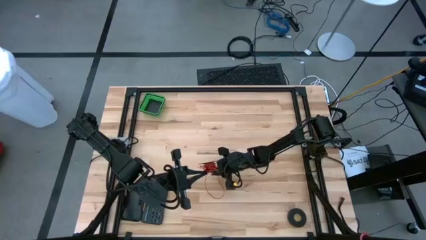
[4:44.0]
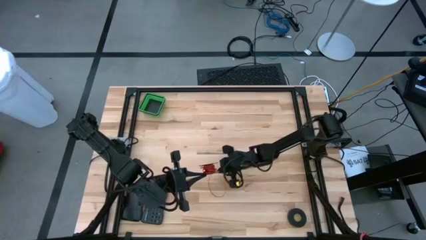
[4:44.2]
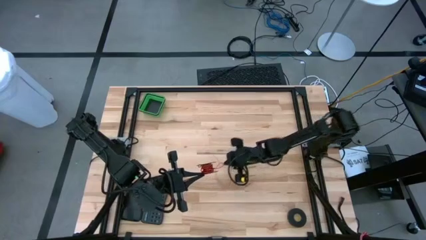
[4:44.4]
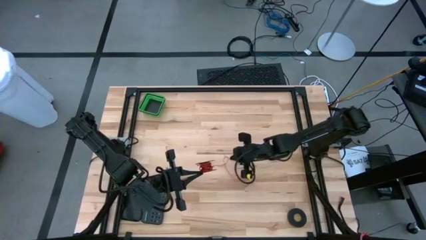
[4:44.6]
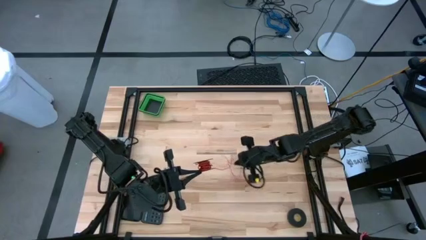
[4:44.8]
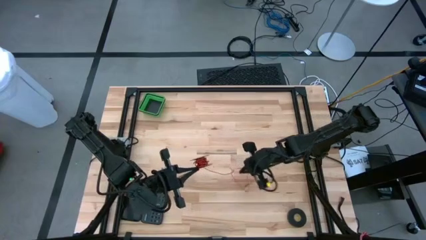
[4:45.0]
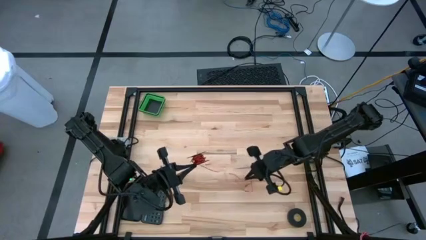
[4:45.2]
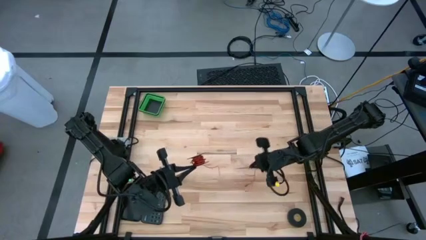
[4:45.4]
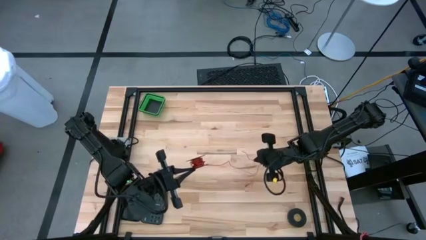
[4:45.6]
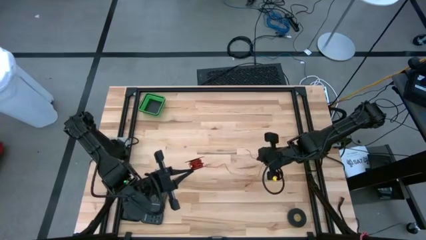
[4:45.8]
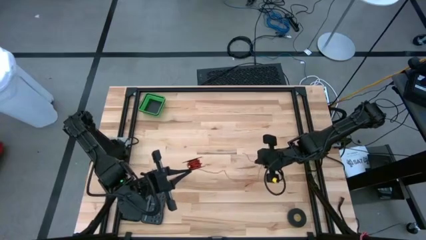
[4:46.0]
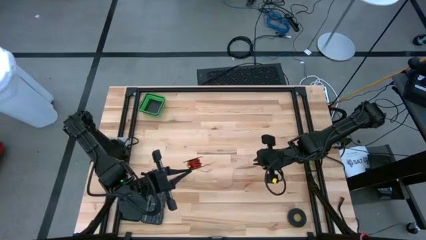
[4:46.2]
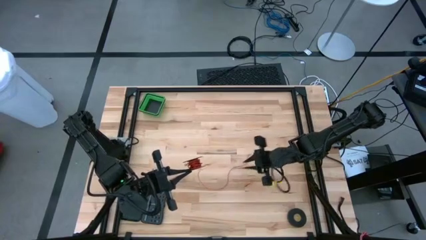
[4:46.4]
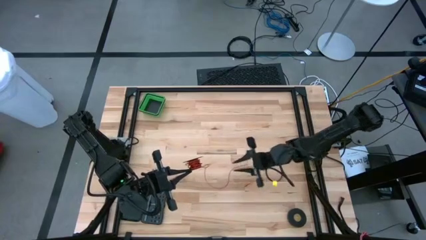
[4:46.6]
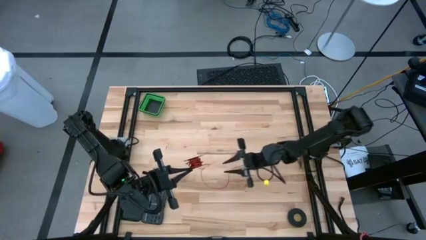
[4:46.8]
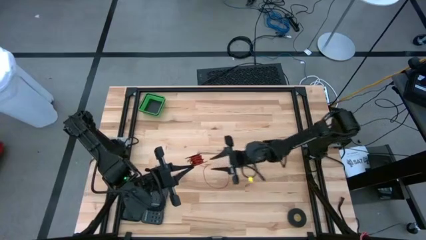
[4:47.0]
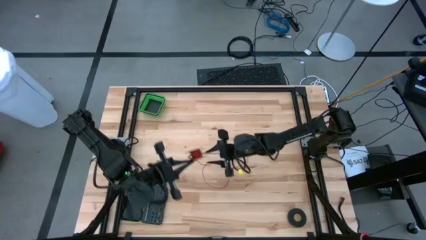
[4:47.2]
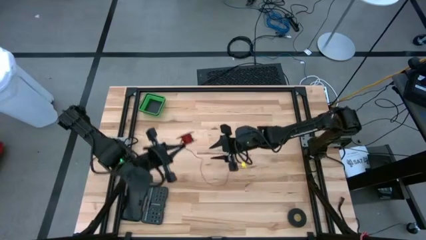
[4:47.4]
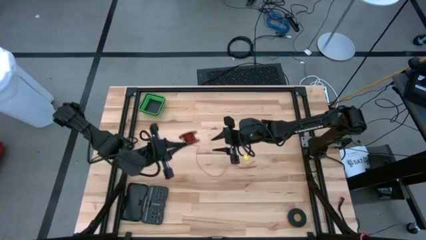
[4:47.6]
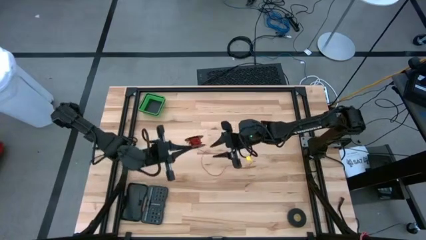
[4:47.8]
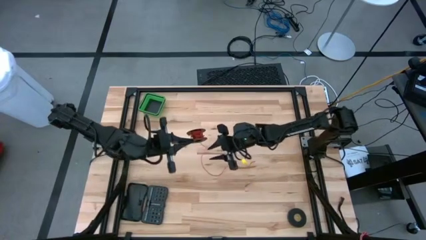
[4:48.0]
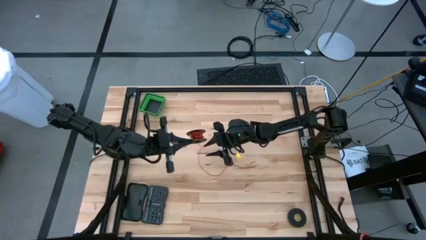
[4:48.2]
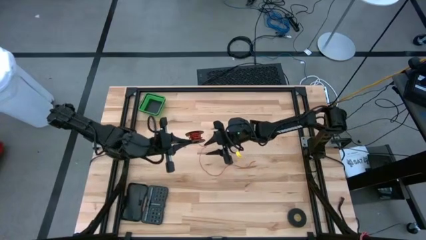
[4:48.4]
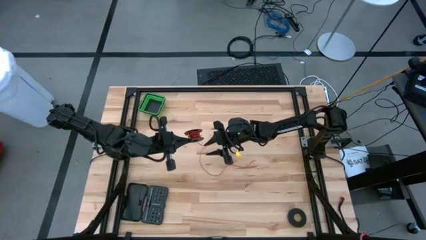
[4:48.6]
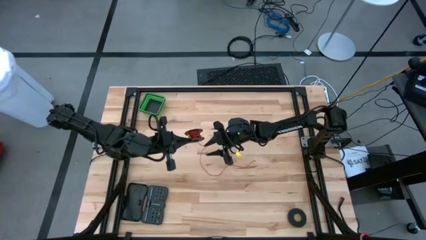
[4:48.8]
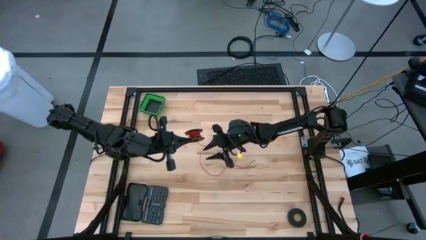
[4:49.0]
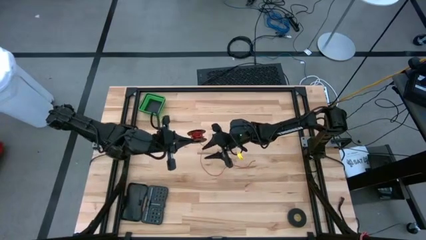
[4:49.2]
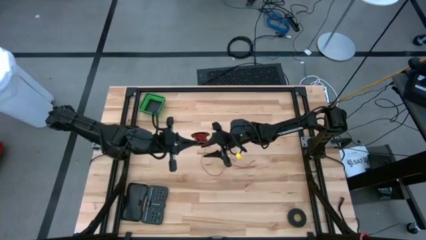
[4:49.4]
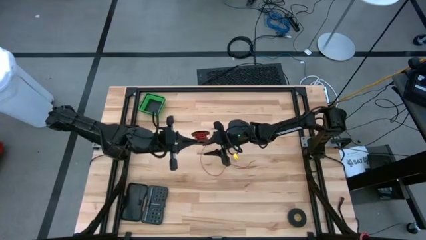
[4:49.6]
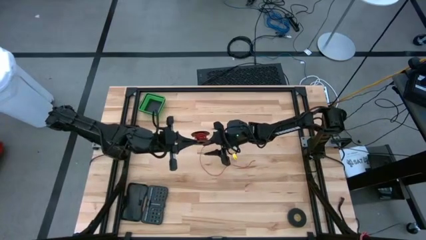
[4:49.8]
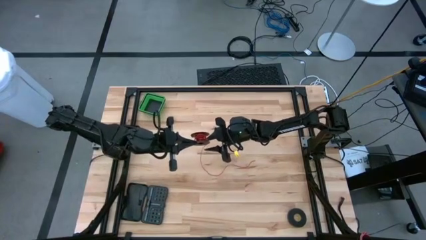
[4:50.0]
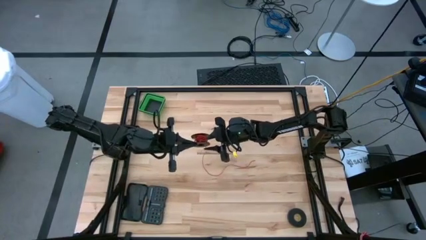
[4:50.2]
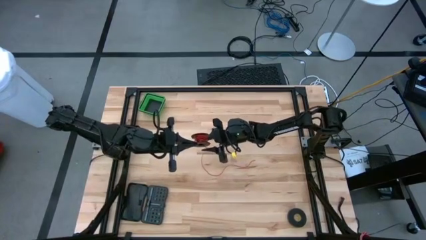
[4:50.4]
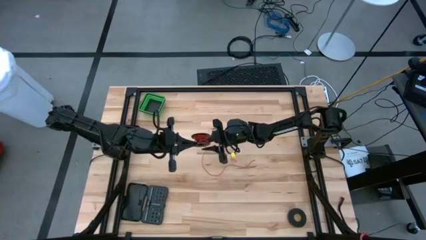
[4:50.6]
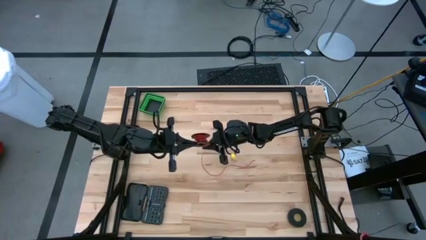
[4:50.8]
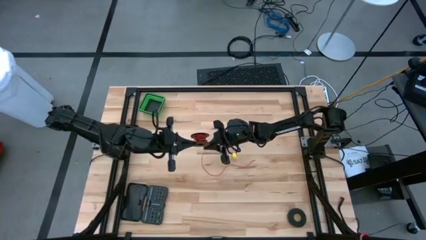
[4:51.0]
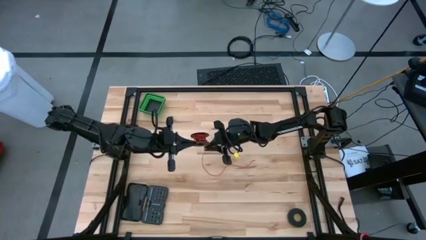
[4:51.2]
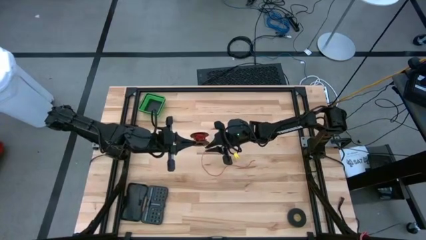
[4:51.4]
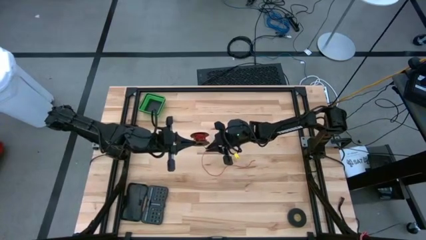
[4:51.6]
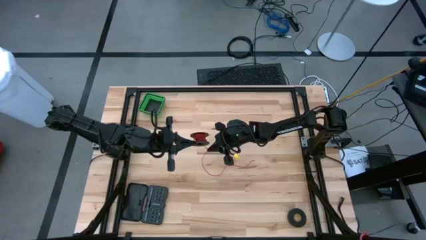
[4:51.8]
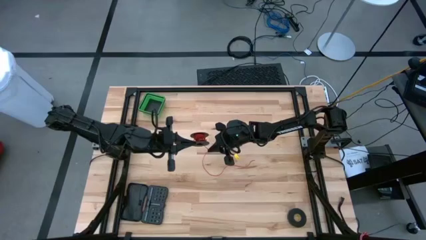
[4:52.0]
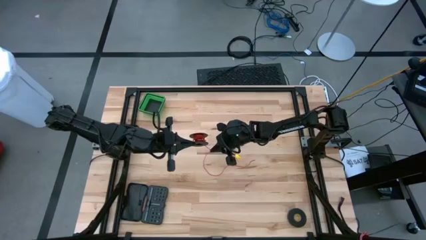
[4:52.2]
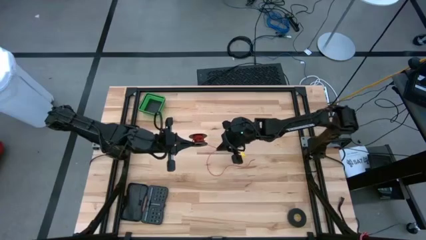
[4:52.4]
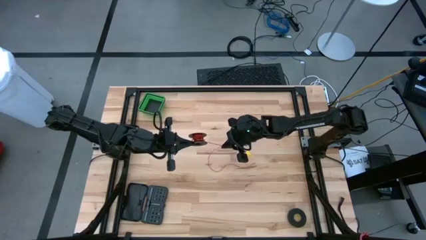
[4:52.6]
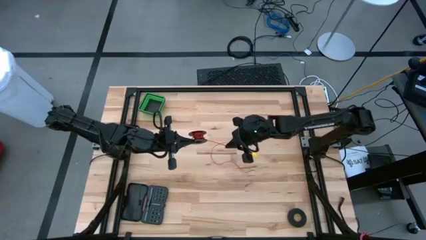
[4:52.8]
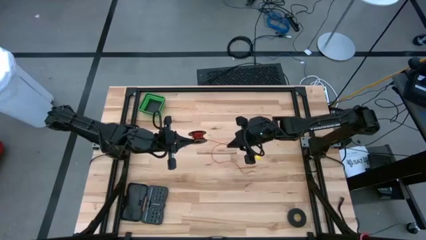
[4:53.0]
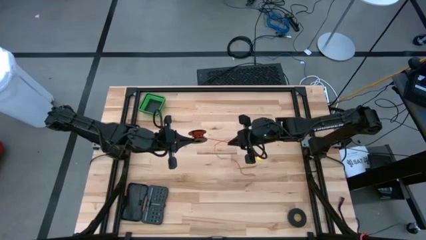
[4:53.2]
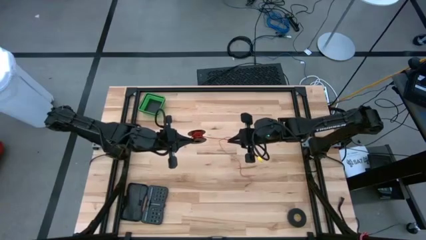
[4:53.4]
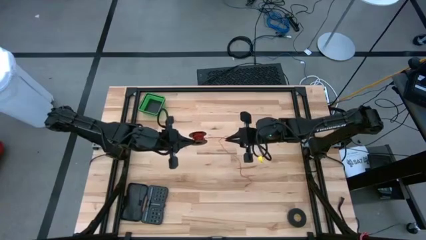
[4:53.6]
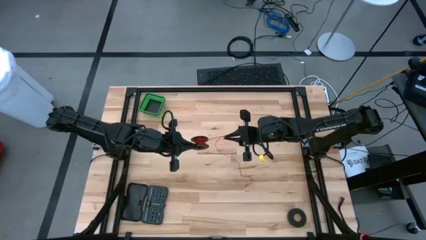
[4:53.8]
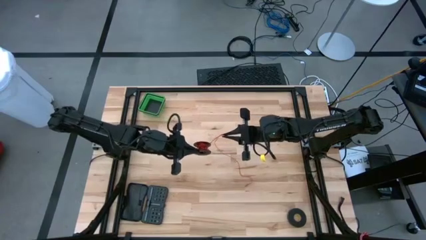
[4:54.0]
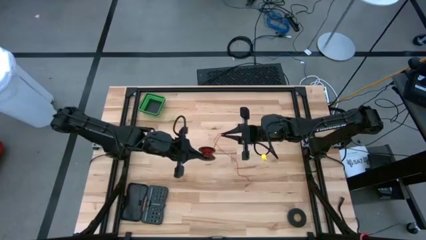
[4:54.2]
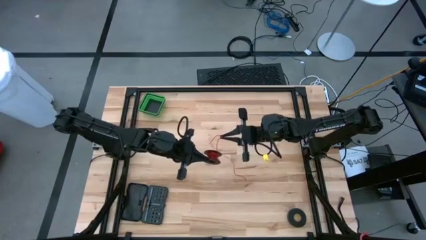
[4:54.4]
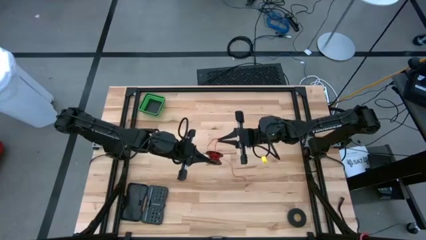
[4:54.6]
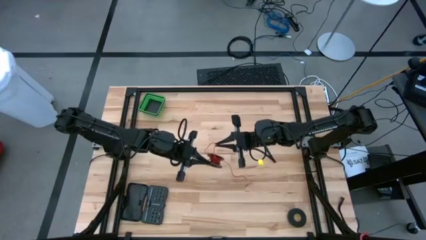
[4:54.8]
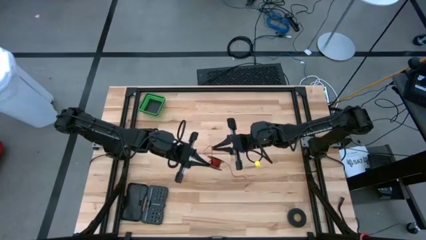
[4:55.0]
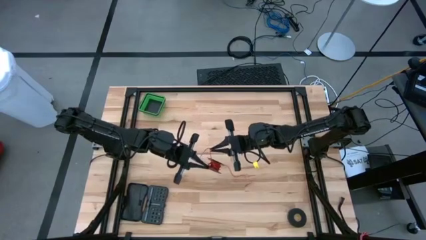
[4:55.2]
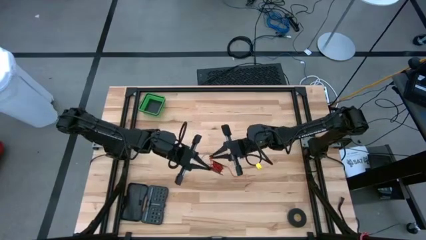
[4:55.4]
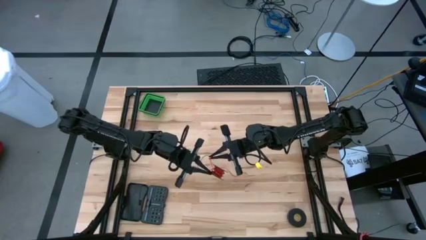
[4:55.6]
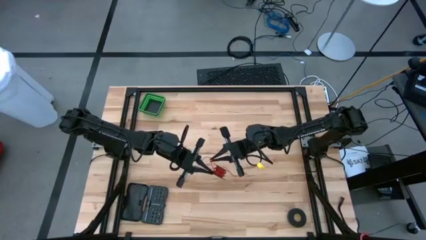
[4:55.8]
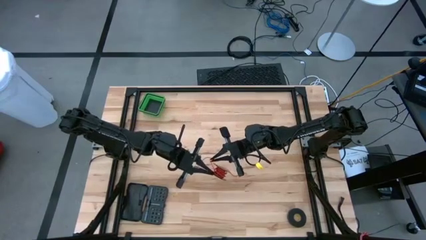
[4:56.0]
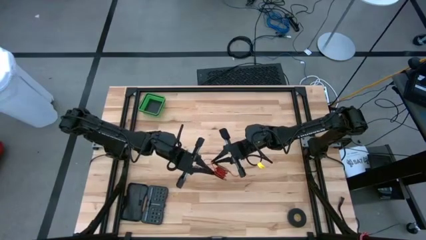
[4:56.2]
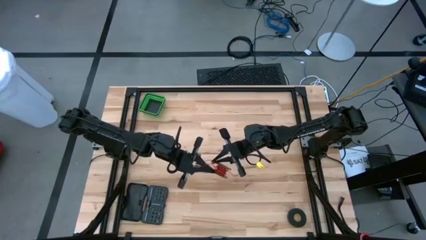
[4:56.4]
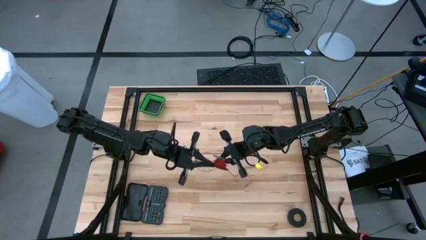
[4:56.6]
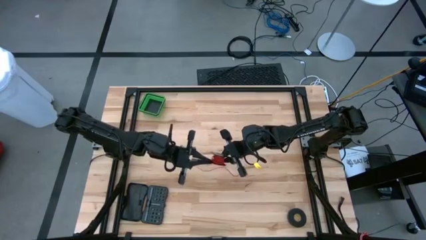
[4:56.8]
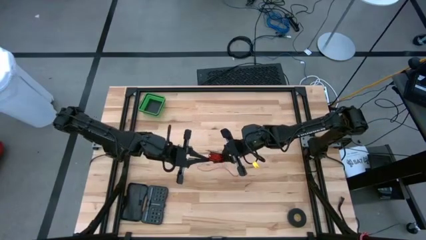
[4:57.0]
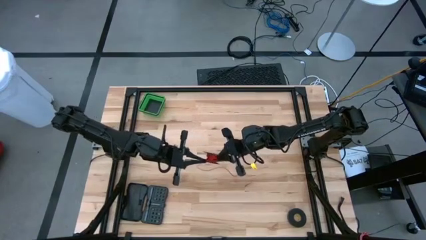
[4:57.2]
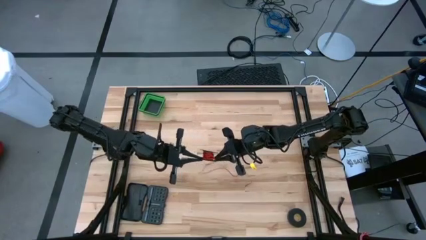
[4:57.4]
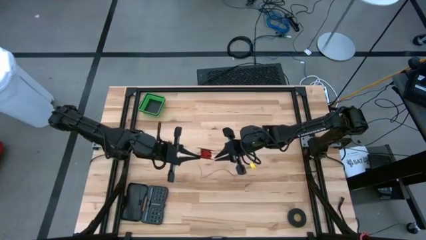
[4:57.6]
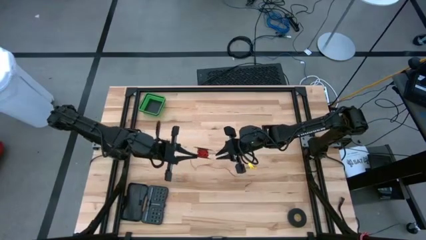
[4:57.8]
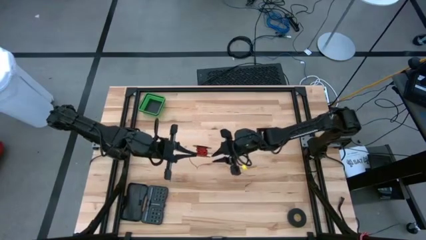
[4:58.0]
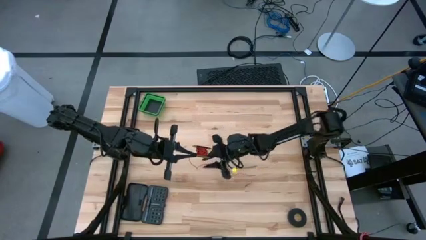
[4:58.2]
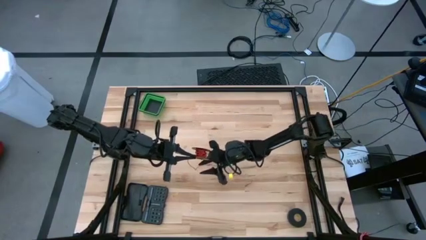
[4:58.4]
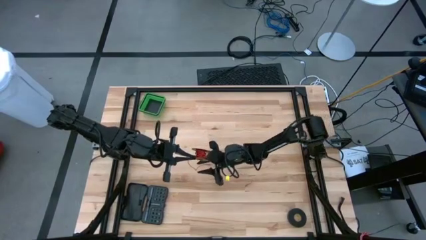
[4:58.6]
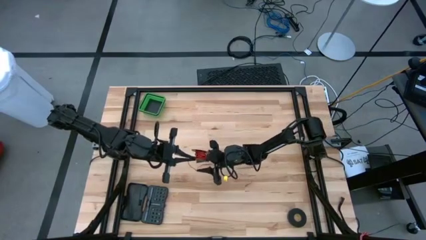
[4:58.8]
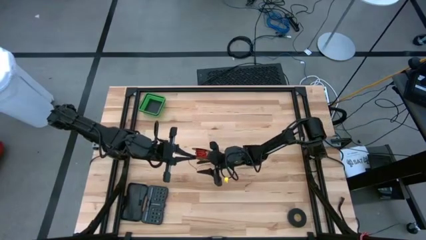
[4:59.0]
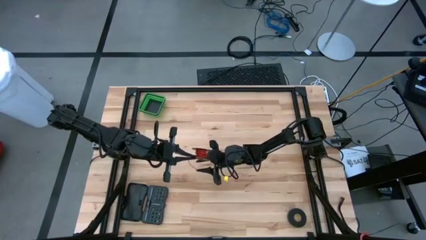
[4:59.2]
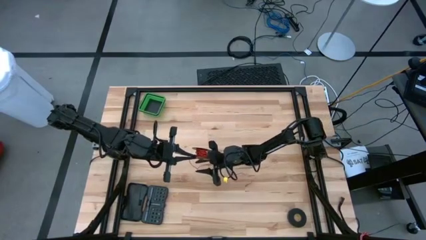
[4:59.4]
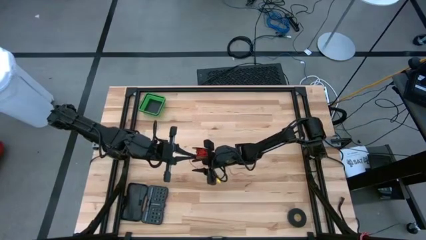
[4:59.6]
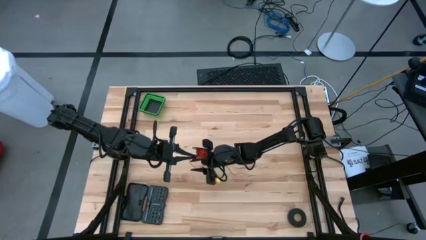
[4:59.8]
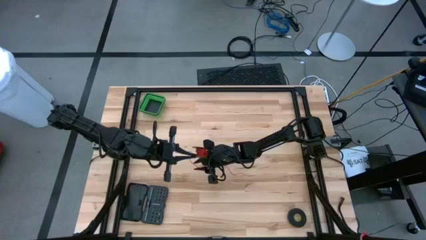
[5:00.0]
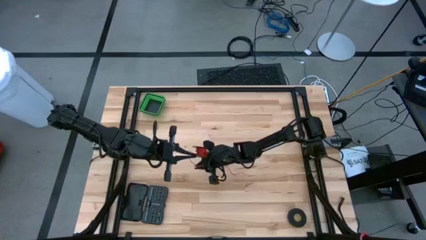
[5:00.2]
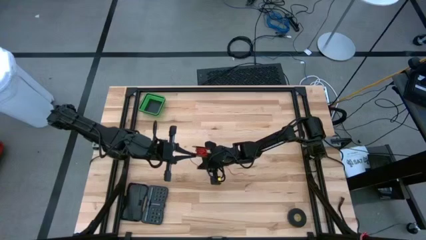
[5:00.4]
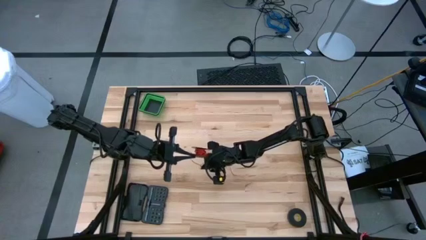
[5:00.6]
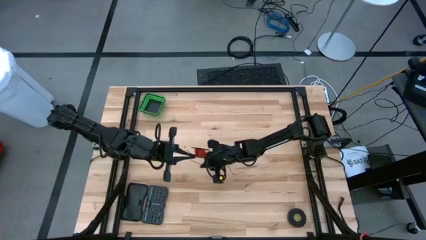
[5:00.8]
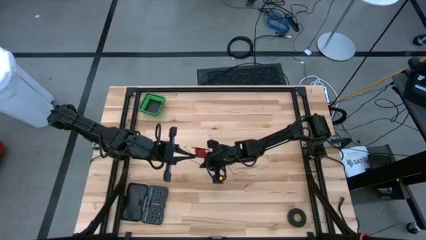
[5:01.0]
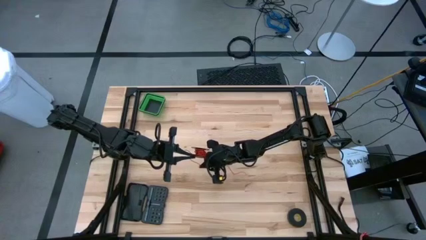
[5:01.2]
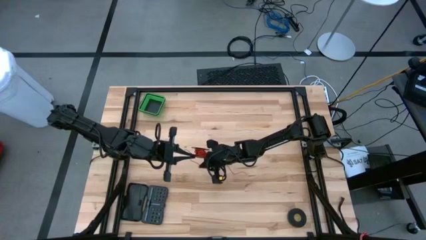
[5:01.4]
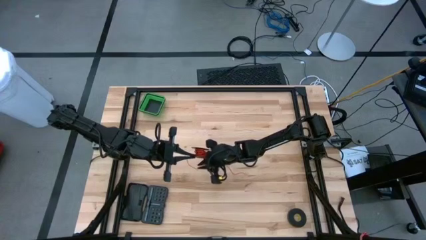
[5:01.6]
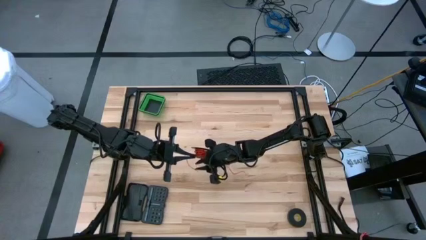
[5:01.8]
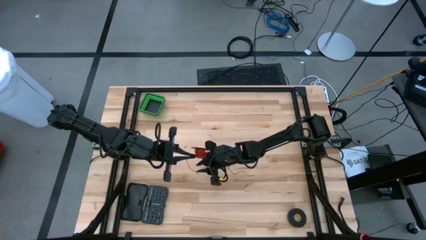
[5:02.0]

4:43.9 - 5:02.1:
Task: Coil cords
Coil the red wire into the spool
